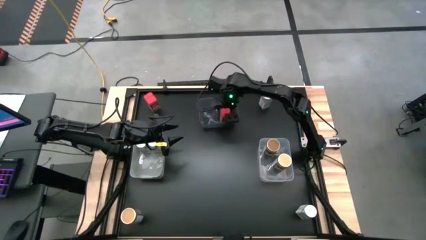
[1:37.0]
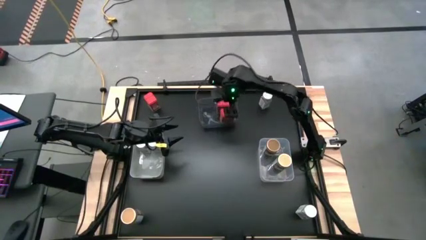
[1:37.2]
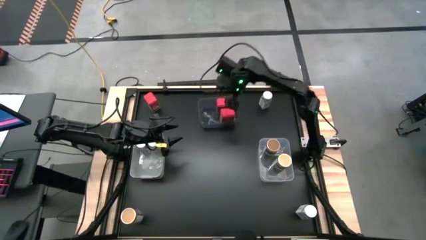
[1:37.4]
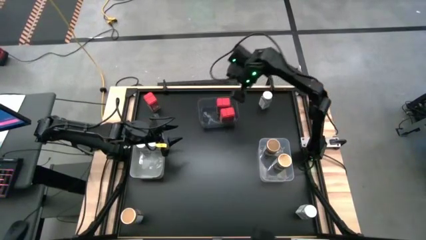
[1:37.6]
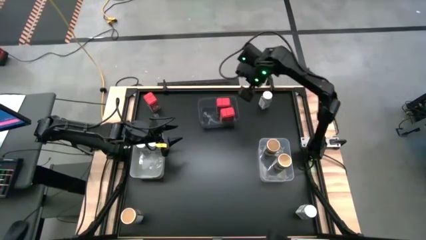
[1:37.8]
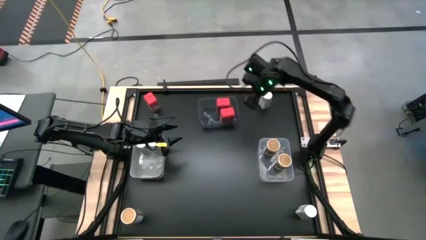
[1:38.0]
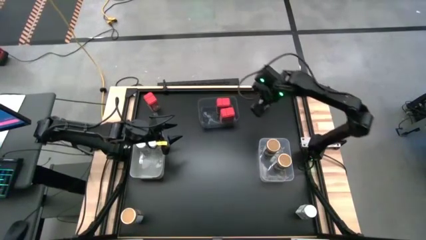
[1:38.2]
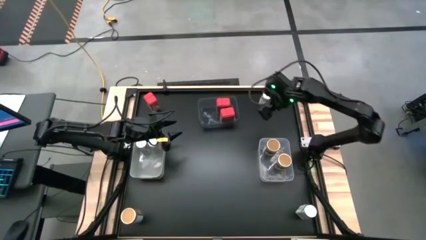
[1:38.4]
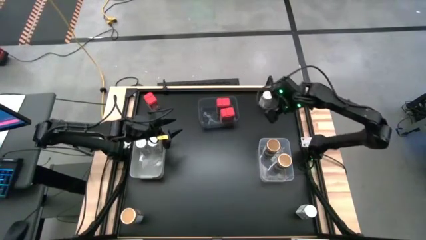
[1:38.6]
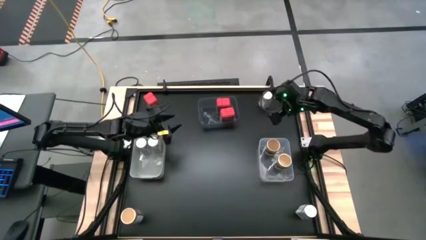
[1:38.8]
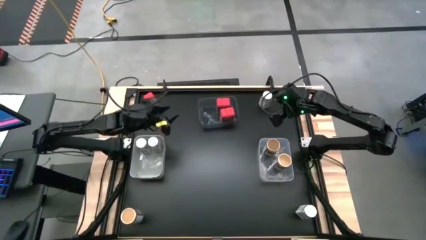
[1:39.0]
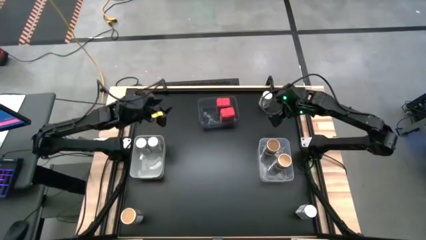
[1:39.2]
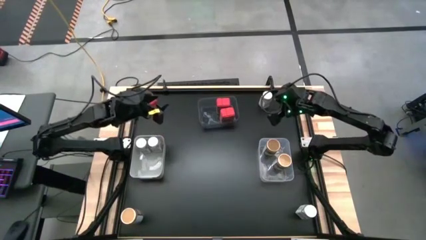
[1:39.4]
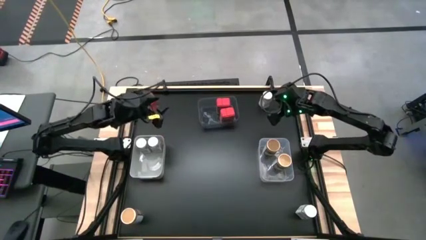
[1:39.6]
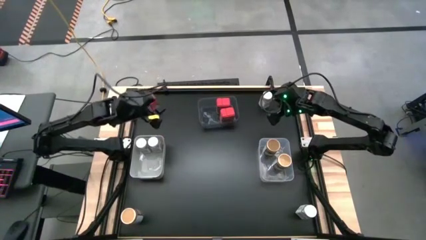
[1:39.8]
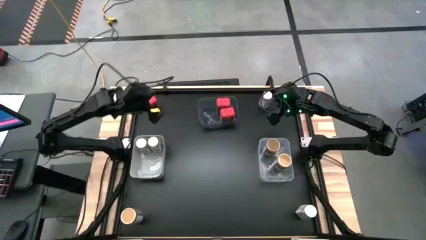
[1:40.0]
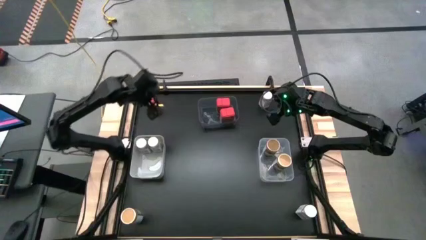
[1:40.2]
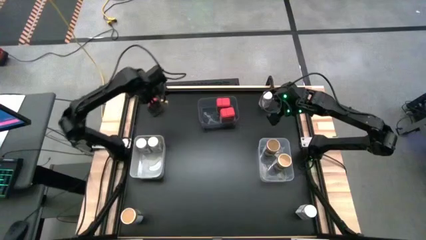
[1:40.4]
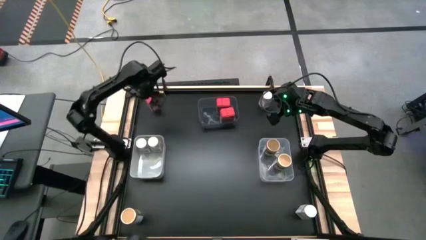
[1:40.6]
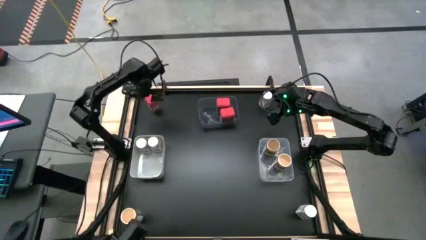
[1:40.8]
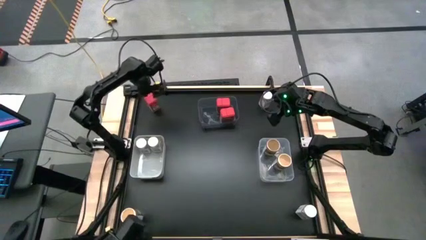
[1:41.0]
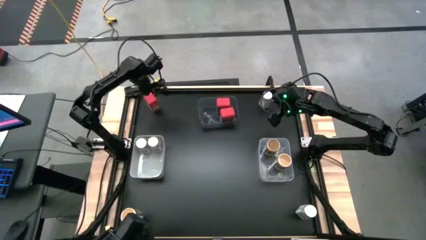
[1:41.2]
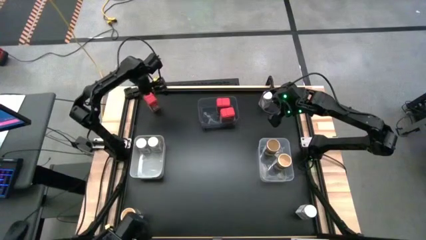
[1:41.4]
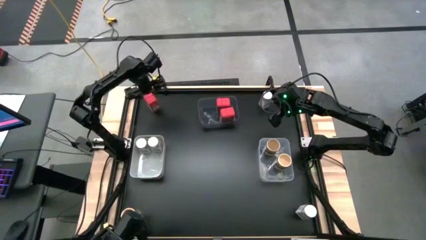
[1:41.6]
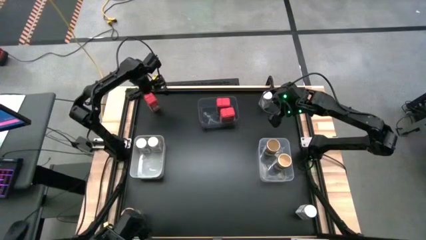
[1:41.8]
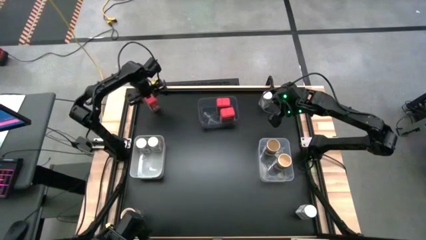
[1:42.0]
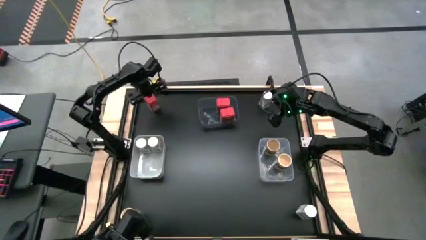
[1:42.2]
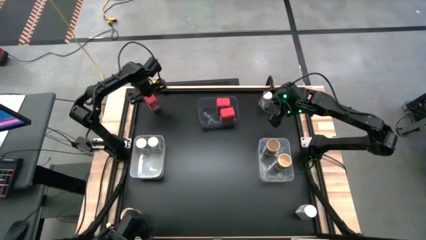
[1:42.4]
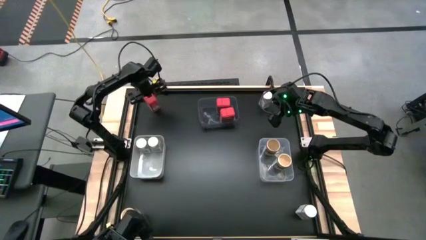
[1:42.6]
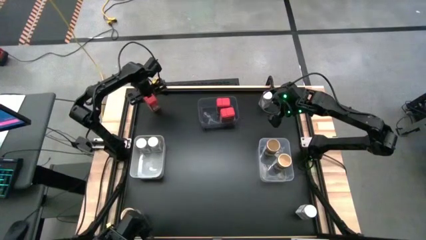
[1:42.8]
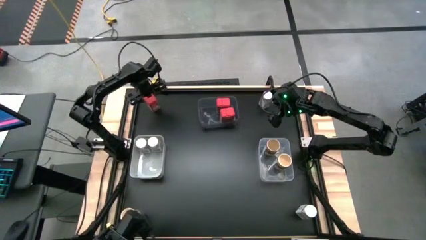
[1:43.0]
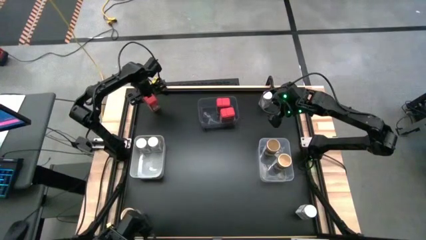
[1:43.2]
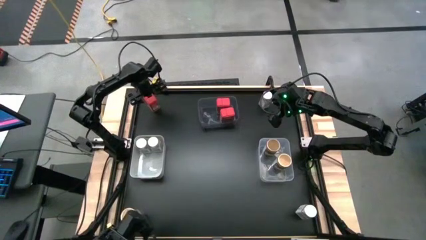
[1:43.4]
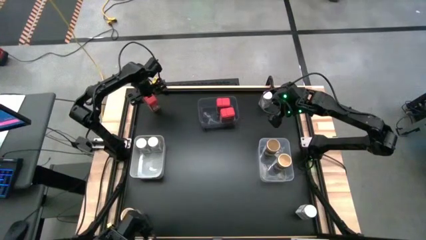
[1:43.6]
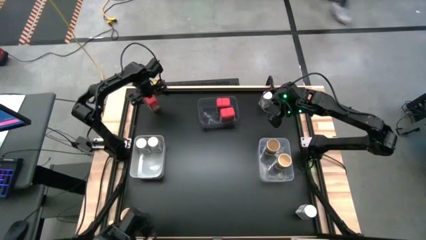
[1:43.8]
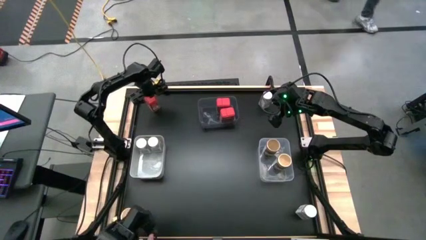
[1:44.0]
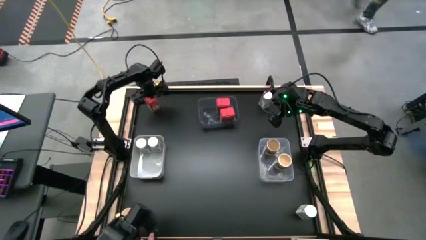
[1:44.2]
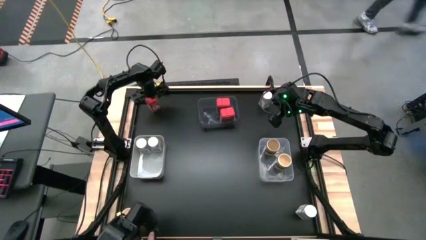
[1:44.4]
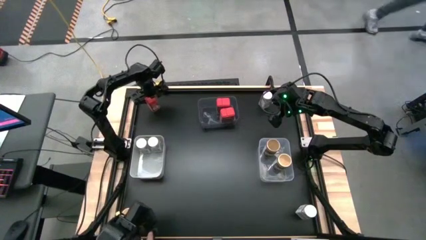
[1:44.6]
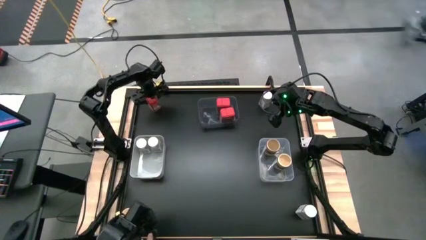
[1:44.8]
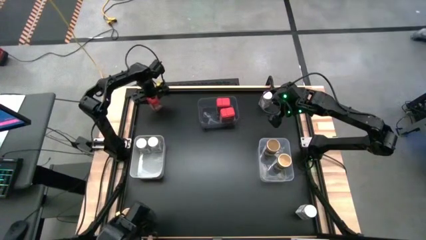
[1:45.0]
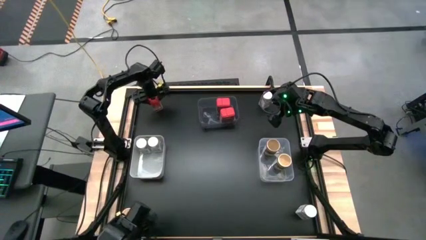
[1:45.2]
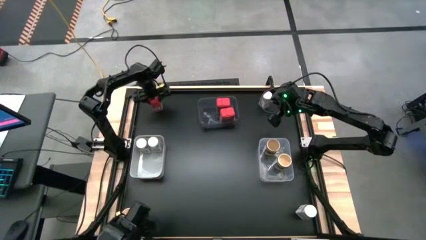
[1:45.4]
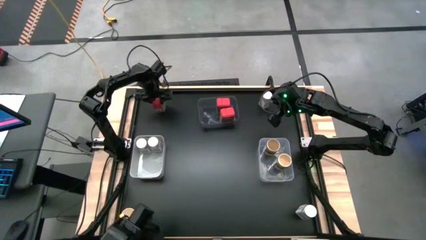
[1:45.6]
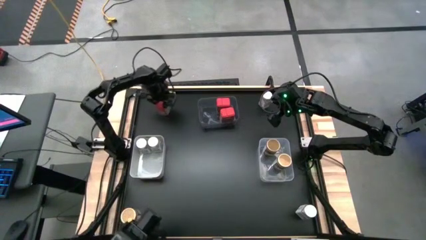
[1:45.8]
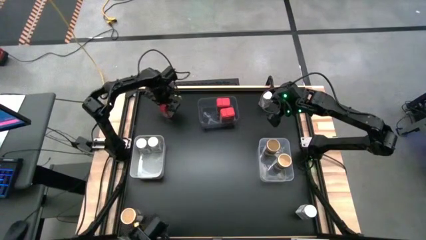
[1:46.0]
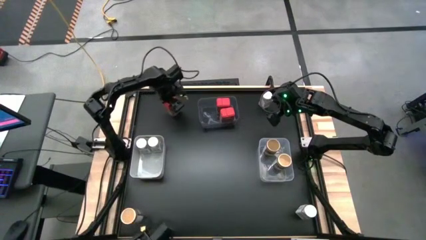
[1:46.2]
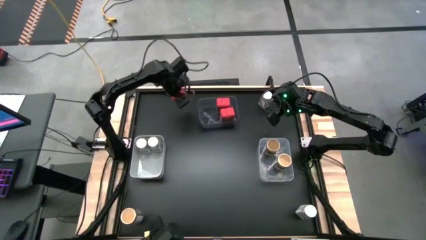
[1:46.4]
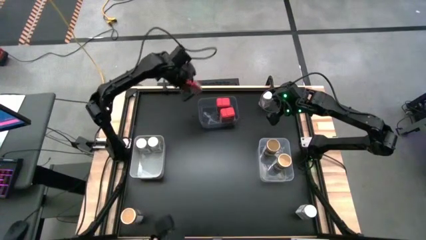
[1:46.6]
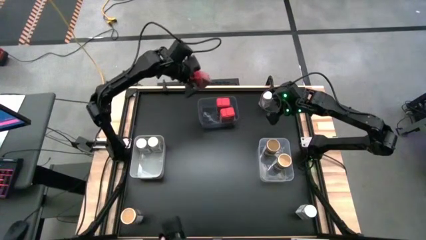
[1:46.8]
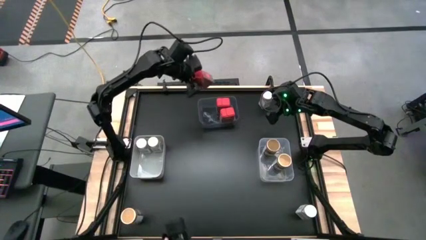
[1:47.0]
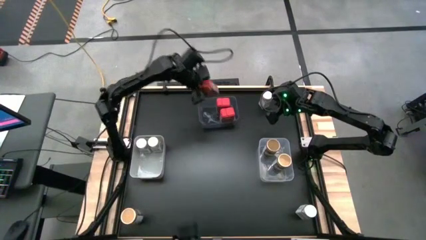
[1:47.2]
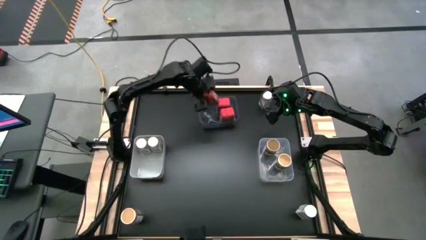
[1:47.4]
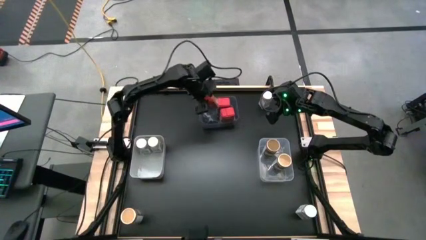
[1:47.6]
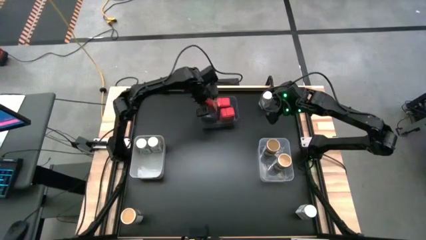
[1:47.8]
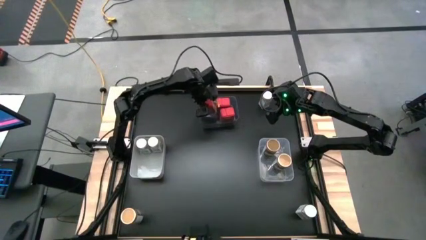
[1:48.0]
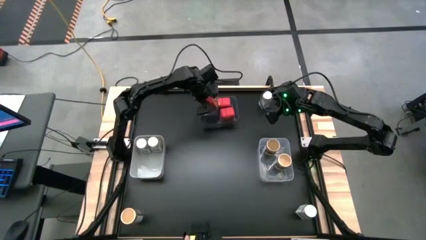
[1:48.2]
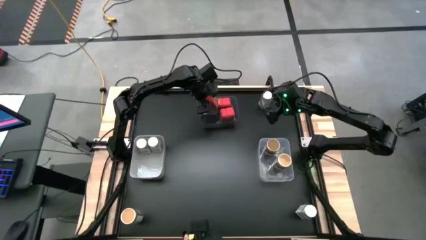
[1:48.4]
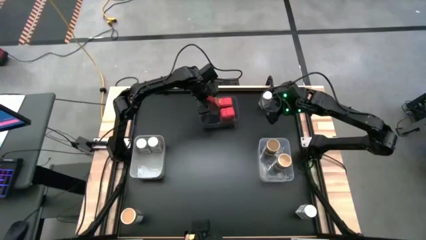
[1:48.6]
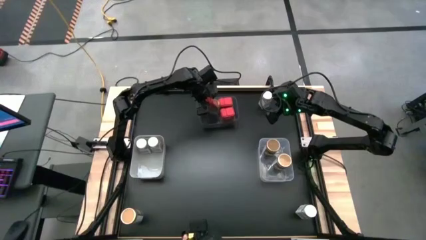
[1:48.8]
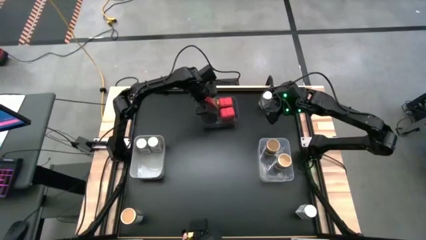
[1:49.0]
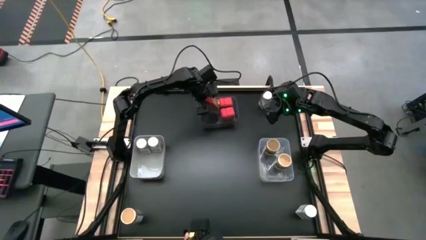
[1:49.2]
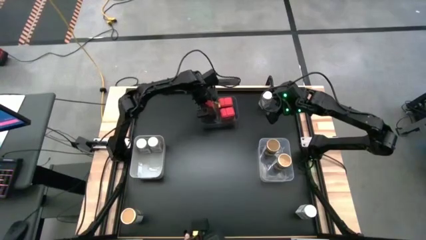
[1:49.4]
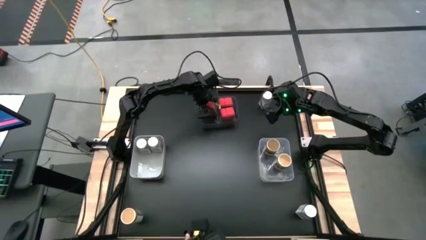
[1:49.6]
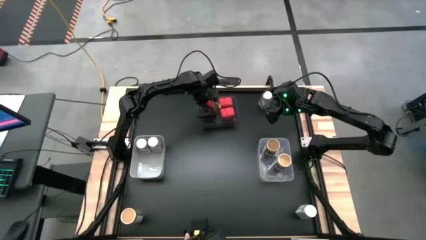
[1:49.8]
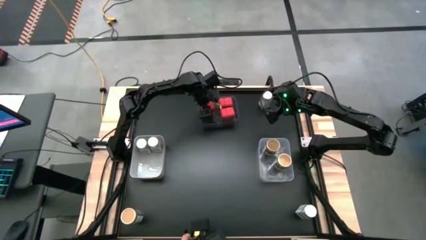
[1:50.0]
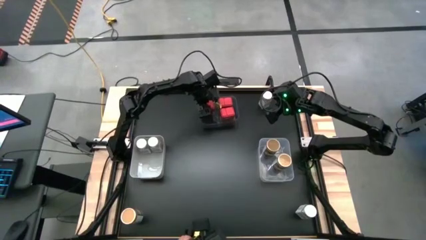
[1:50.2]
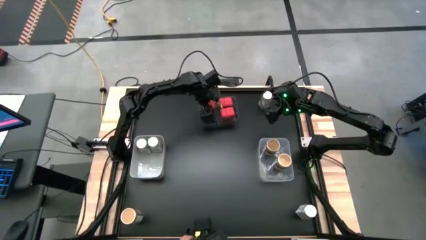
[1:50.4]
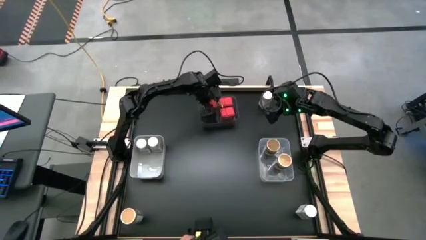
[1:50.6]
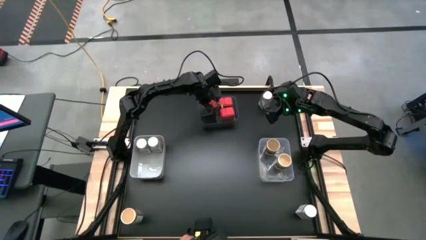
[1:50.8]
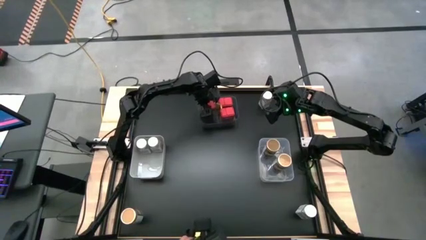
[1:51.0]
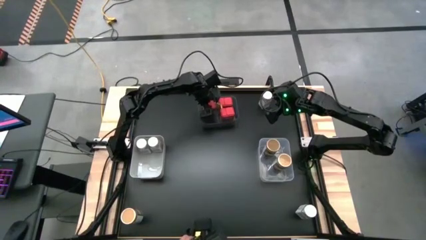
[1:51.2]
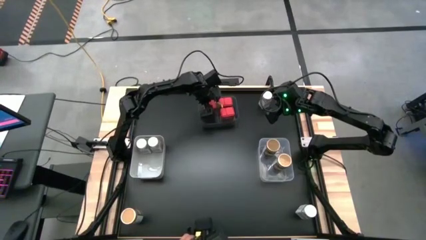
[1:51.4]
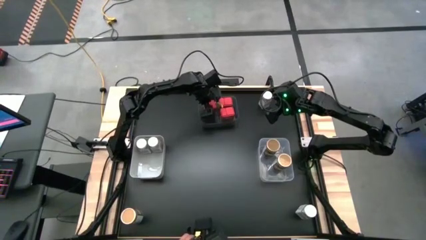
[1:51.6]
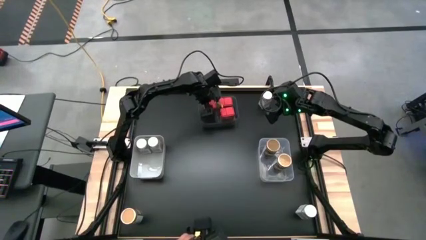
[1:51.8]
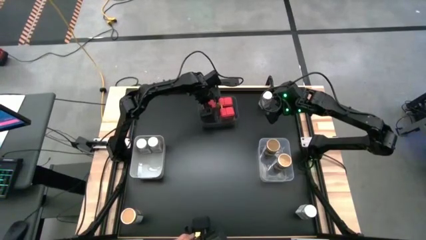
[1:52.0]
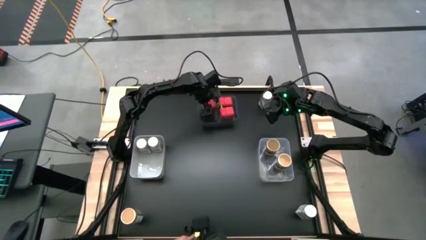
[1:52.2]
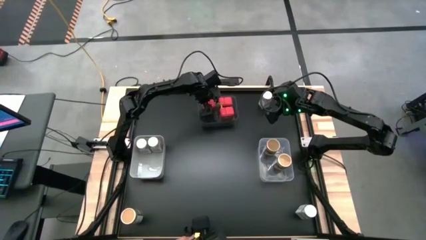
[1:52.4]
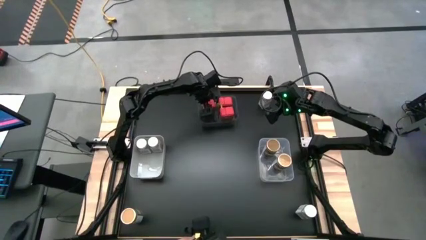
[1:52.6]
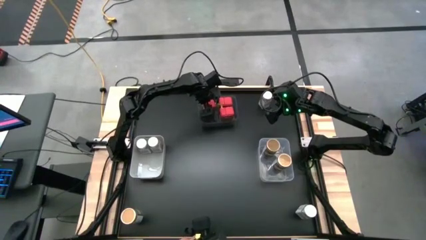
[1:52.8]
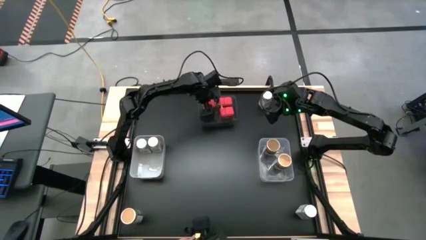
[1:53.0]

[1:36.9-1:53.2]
Task: Sort spices by type
Put the red seasoning can into the black bin
